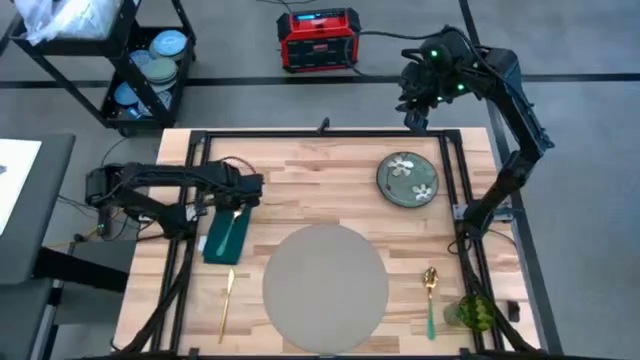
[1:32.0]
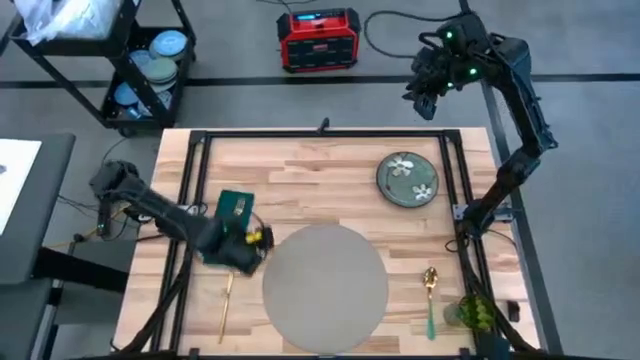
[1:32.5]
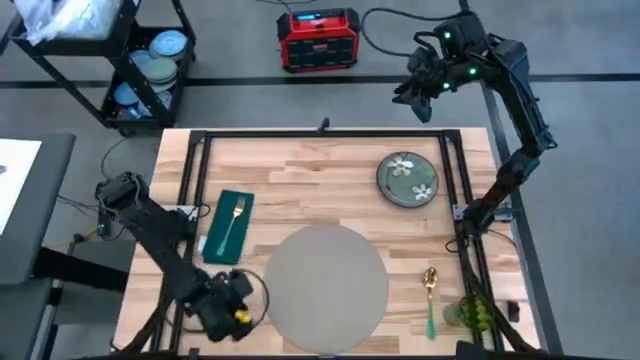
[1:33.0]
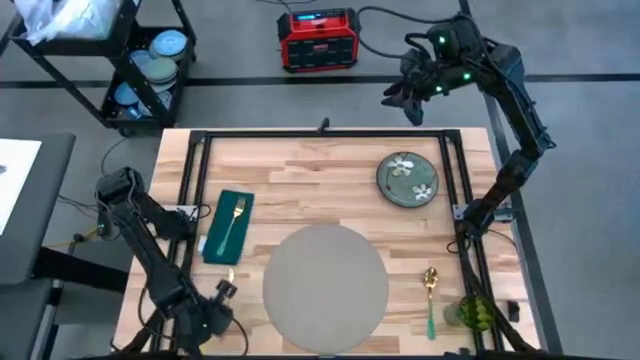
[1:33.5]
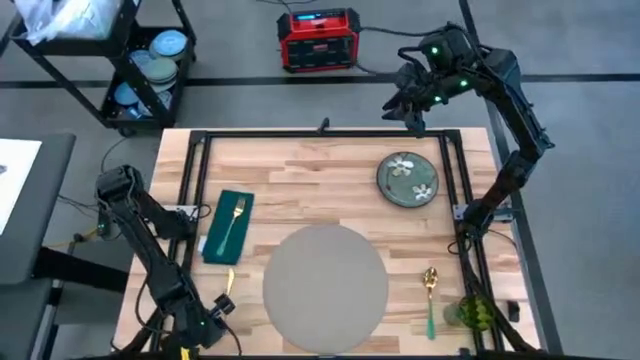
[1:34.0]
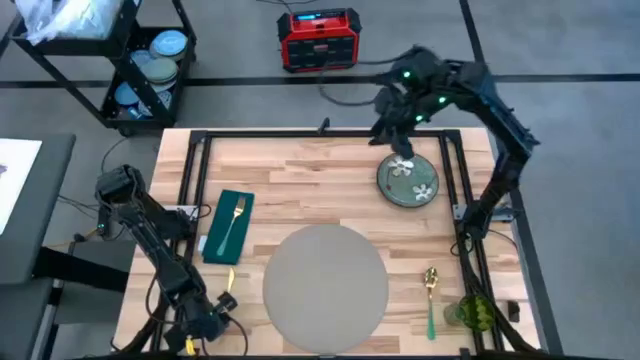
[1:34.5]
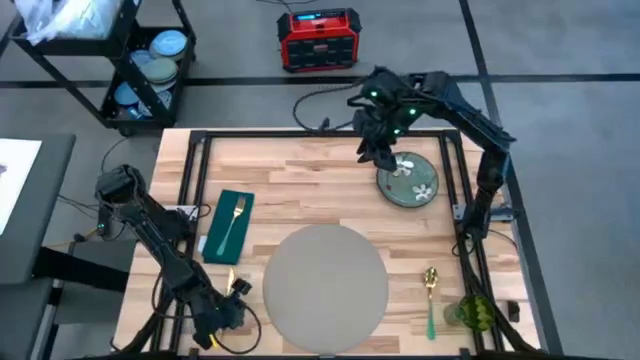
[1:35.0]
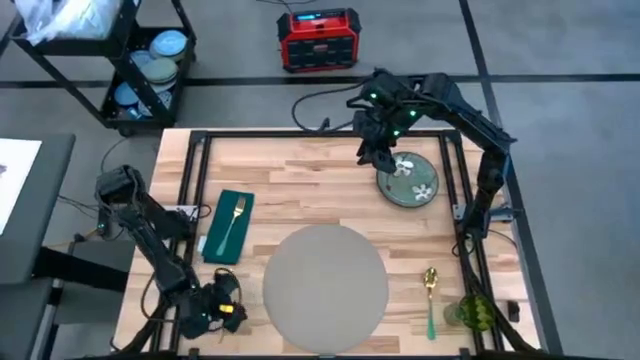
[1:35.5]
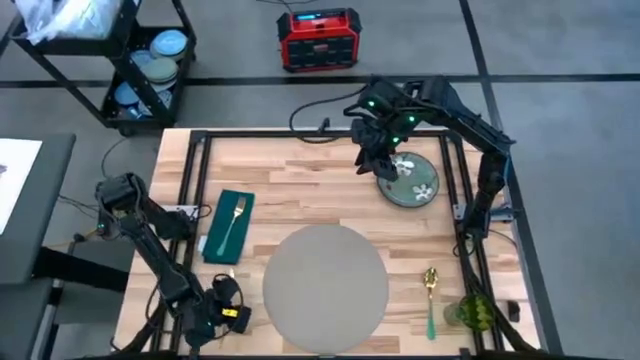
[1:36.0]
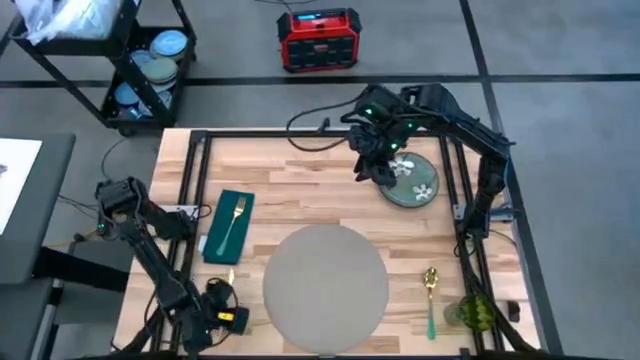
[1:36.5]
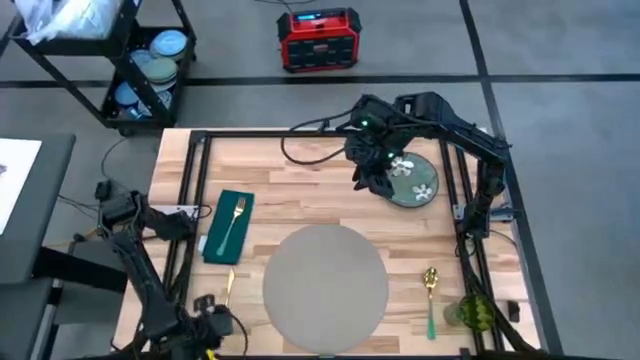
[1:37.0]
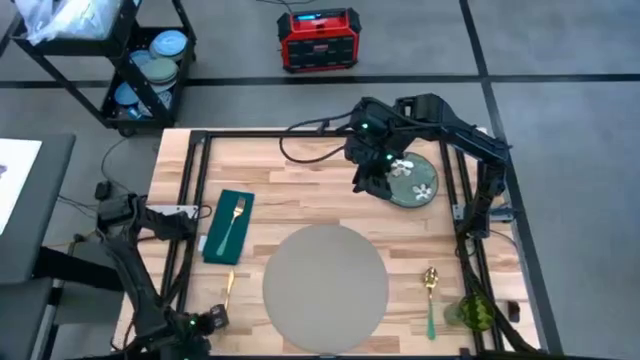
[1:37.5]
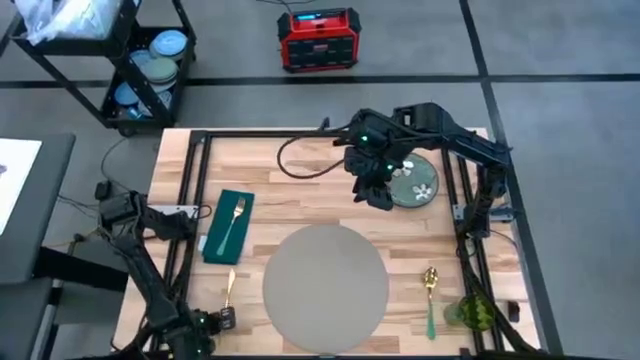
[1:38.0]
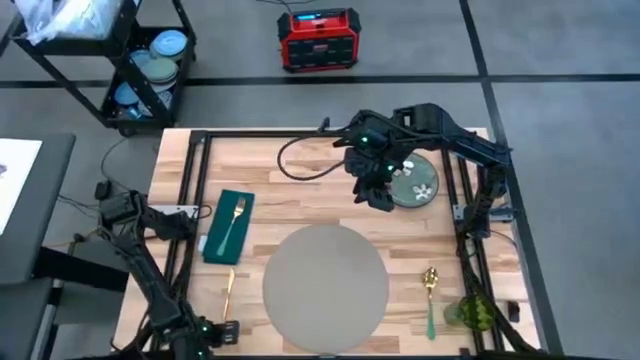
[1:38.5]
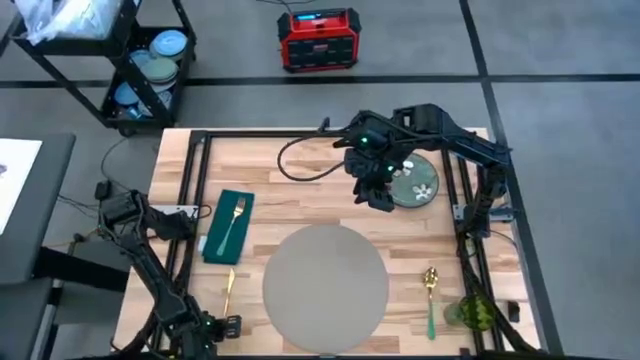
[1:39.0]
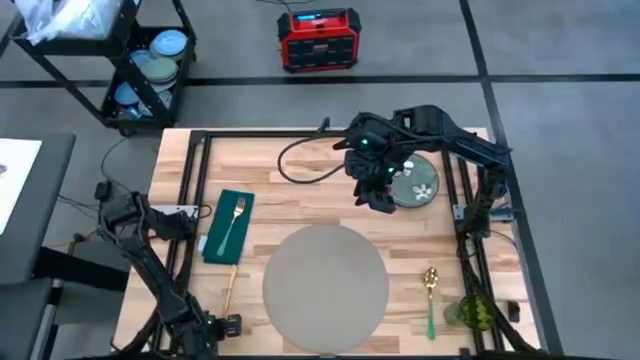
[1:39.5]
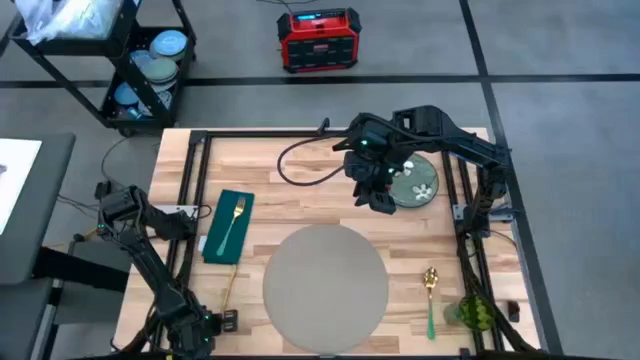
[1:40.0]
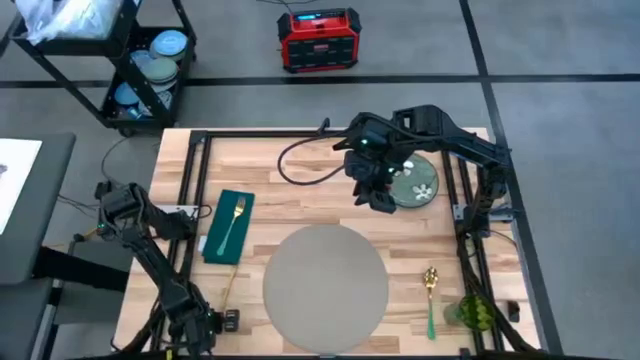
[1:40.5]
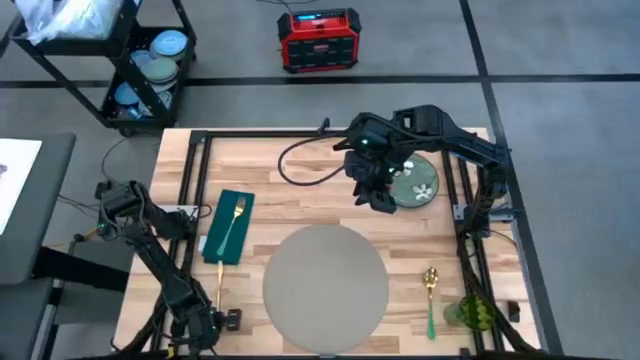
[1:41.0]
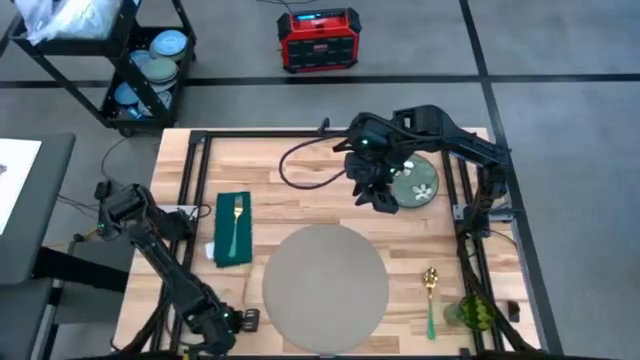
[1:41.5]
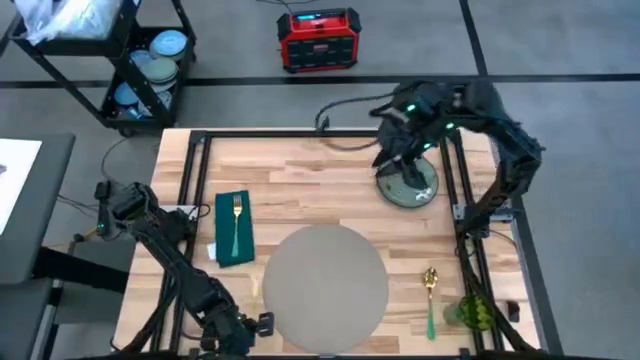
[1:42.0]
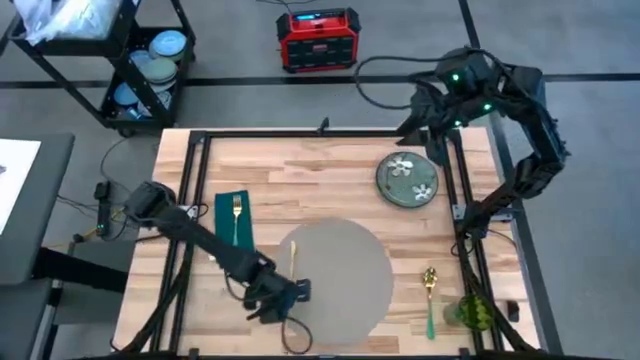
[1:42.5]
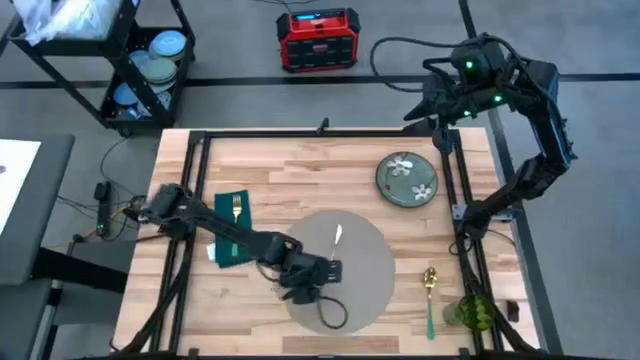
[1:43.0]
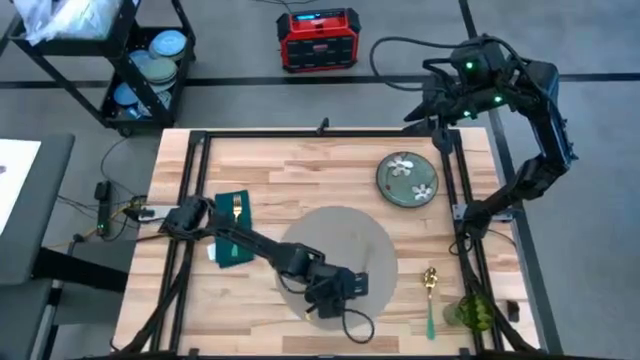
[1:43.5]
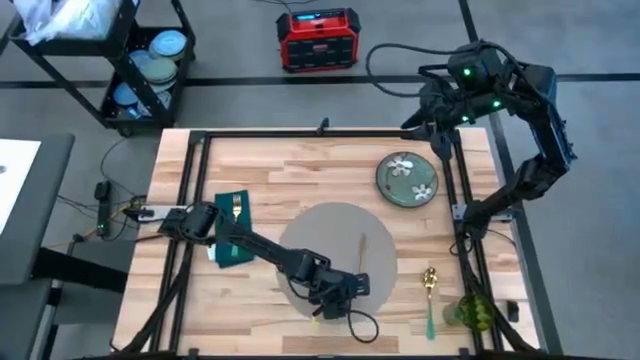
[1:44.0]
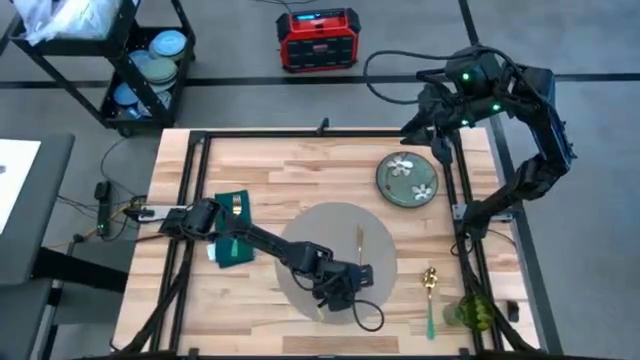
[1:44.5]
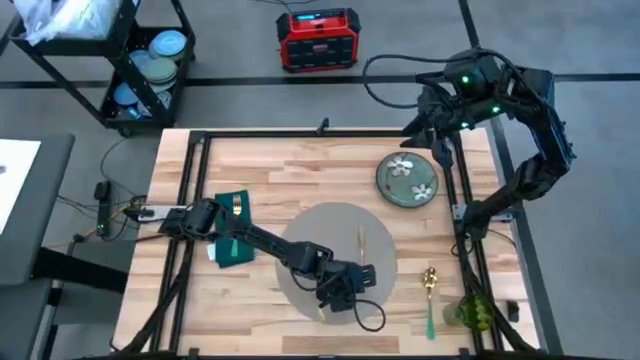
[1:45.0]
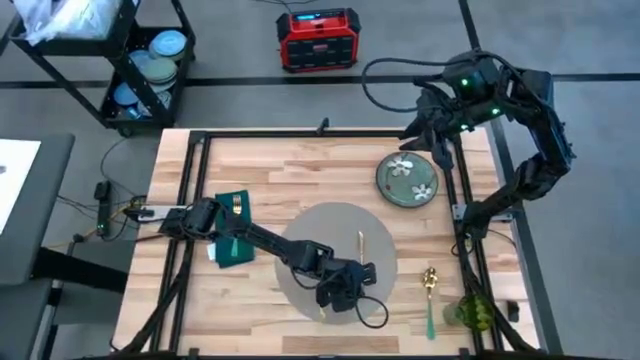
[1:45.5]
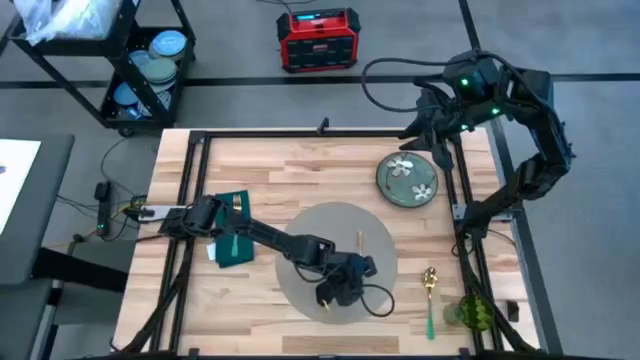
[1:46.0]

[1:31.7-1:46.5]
Task: Set table place
Put the gold knife on the gray placemat

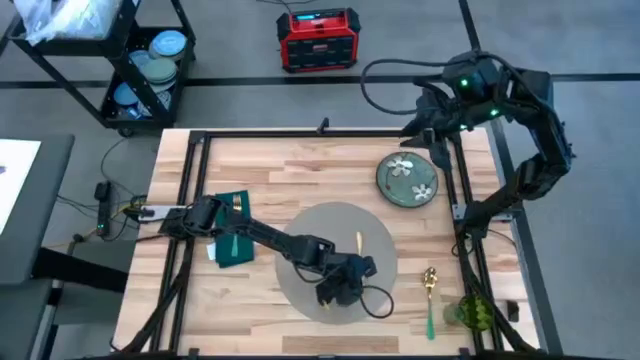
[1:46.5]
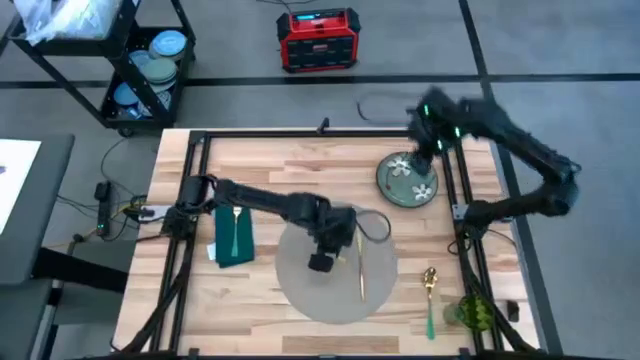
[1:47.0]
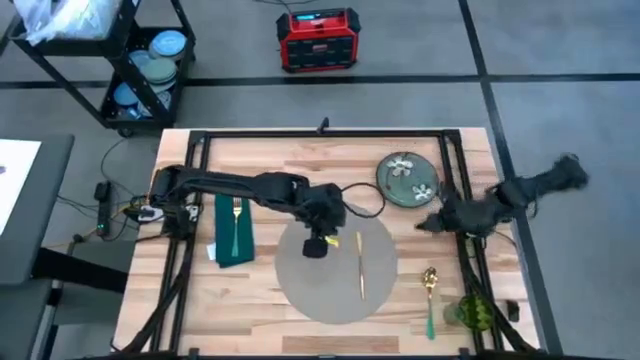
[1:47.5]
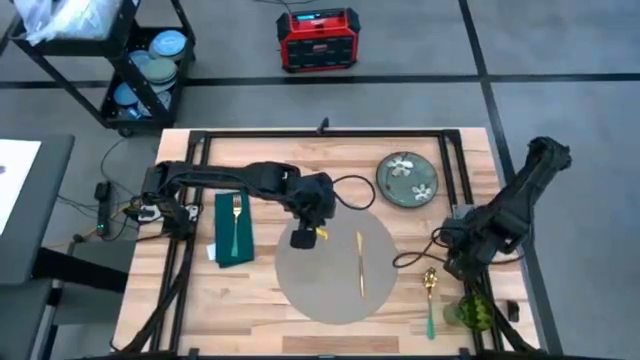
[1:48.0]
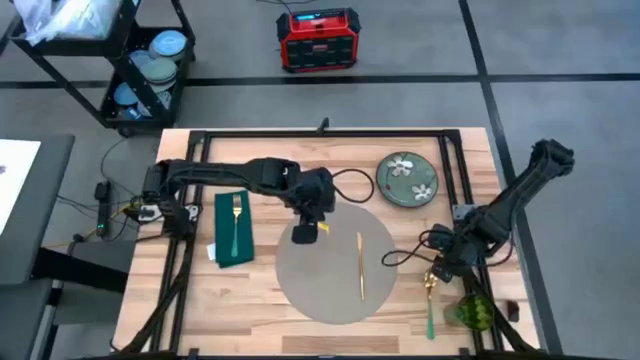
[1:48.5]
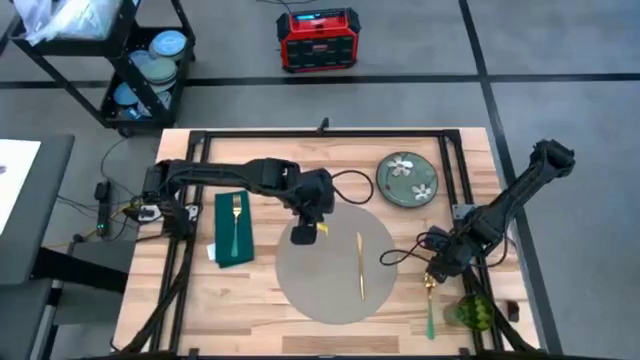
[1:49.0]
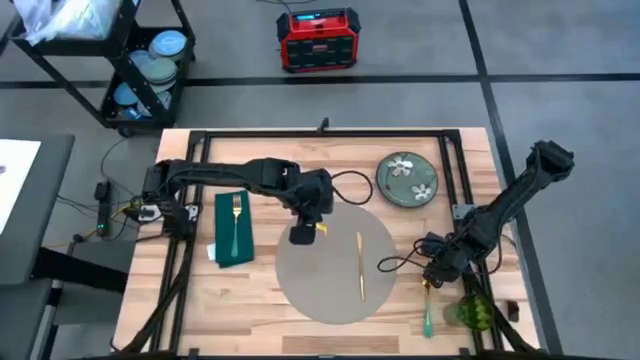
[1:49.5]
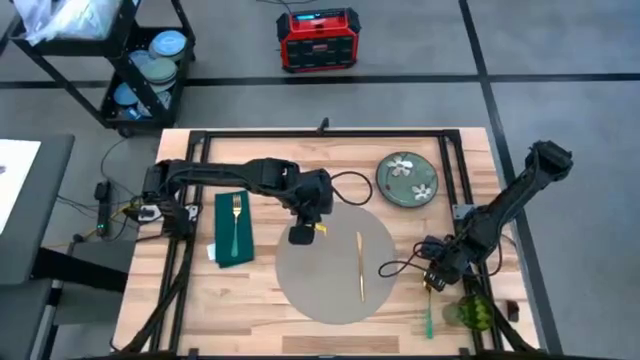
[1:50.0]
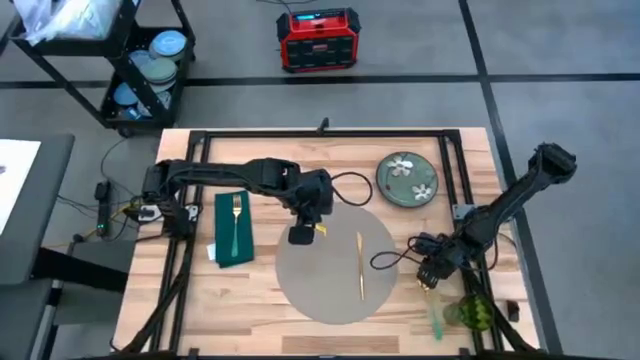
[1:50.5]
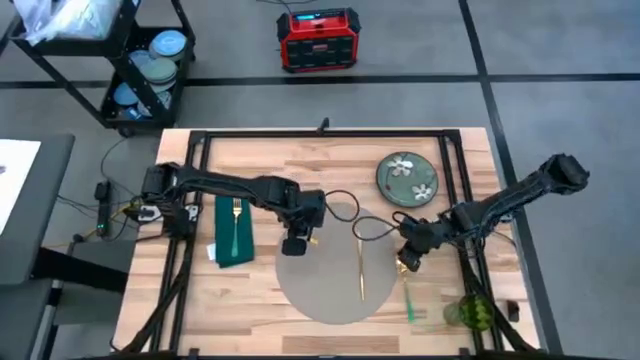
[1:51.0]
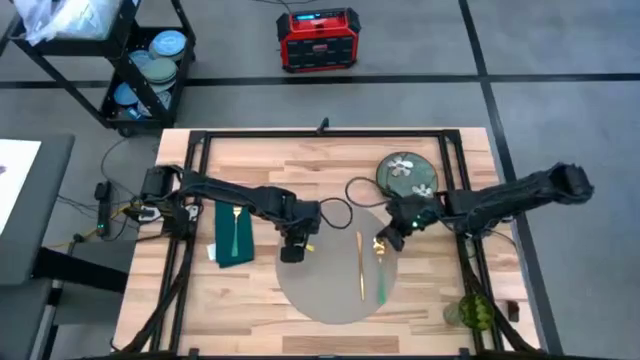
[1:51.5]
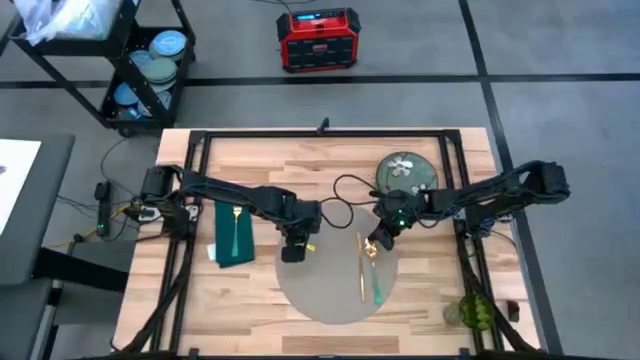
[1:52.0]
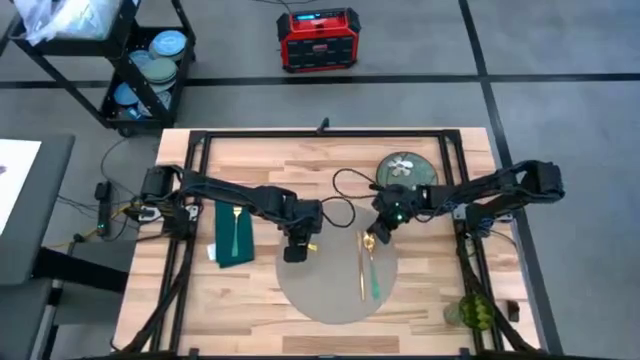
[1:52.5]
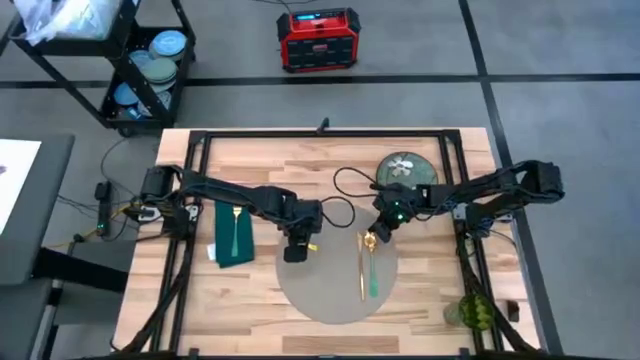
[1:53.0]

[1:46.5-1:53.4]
Put the green spoon on the gray placemat
